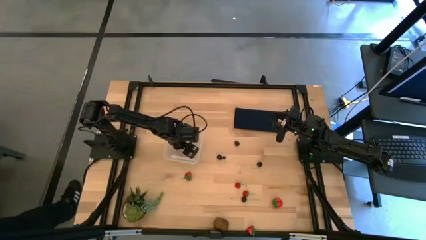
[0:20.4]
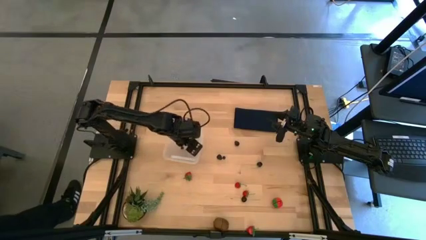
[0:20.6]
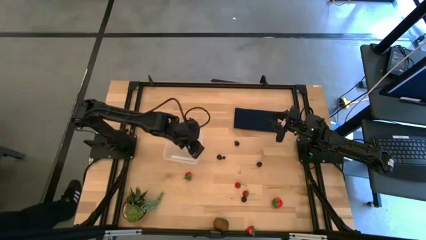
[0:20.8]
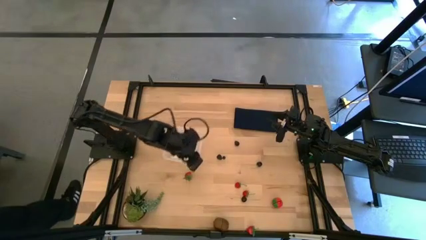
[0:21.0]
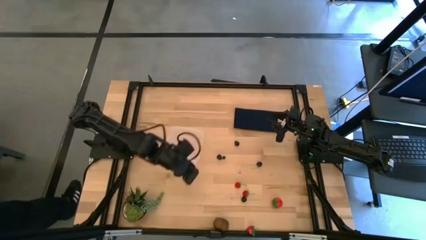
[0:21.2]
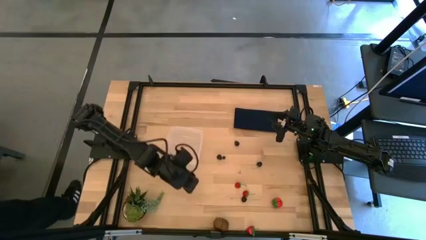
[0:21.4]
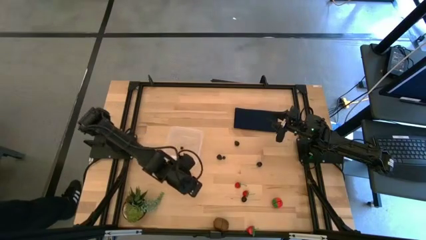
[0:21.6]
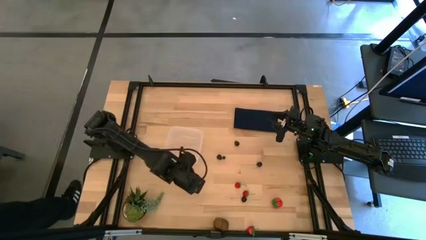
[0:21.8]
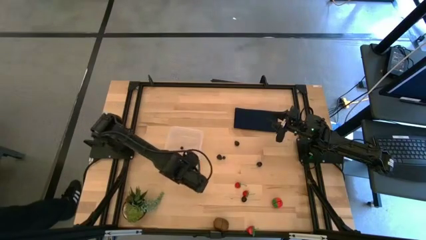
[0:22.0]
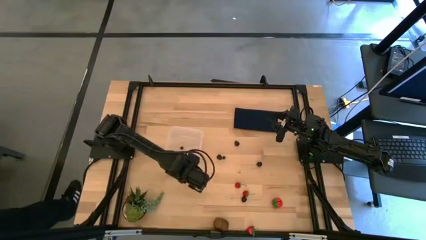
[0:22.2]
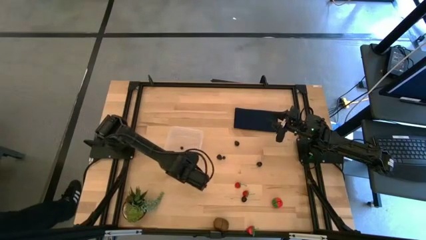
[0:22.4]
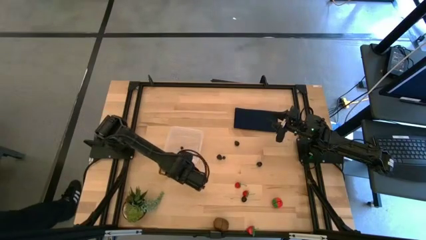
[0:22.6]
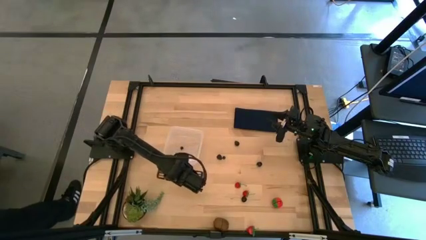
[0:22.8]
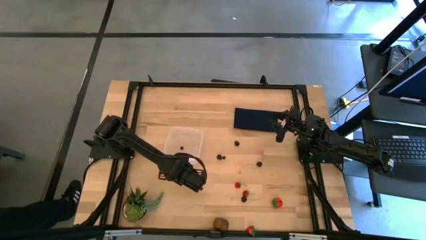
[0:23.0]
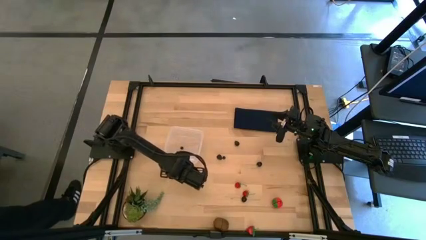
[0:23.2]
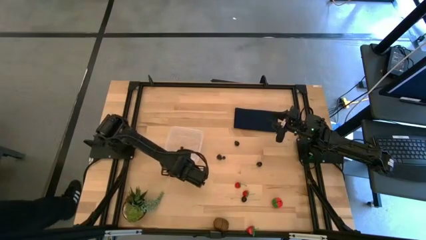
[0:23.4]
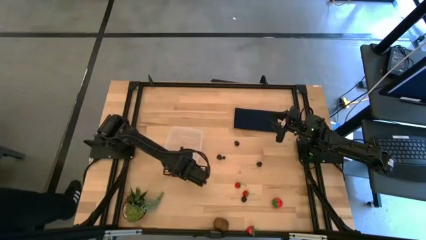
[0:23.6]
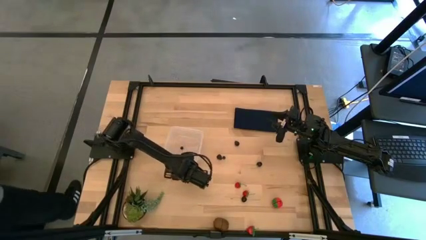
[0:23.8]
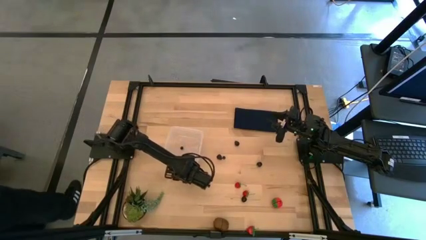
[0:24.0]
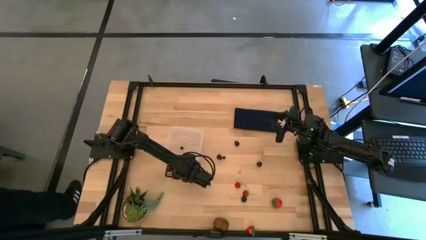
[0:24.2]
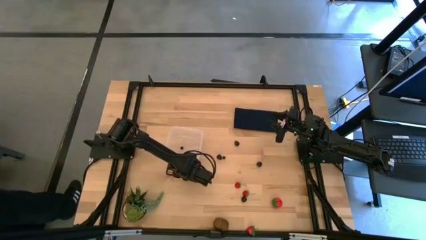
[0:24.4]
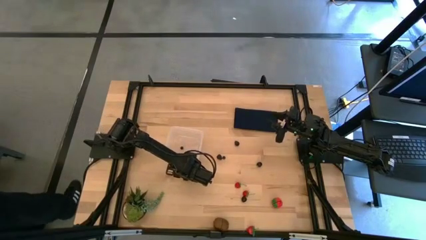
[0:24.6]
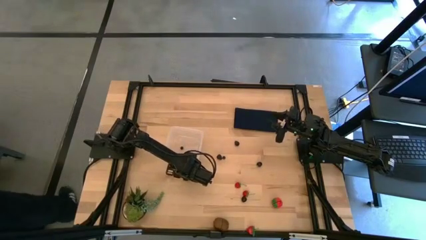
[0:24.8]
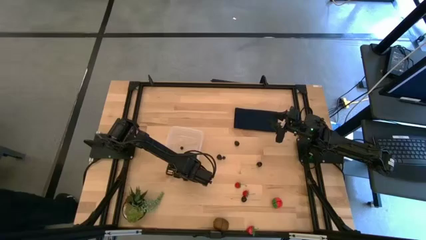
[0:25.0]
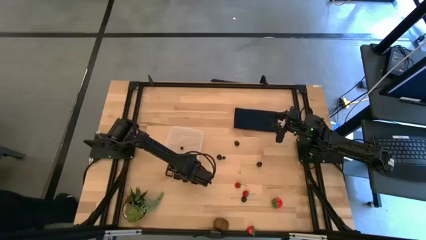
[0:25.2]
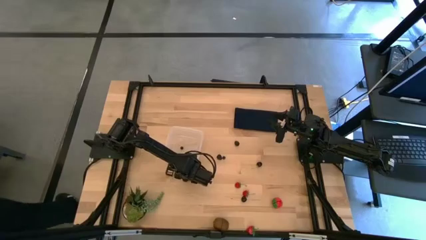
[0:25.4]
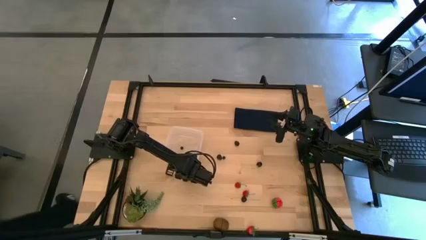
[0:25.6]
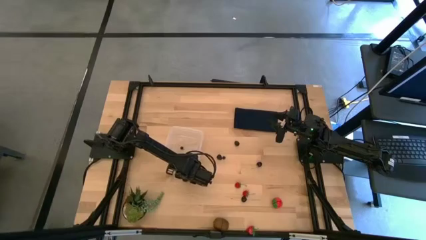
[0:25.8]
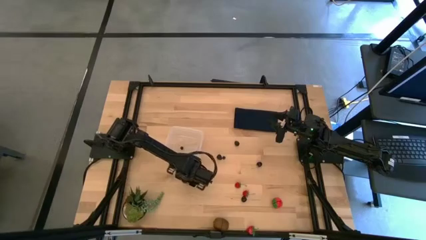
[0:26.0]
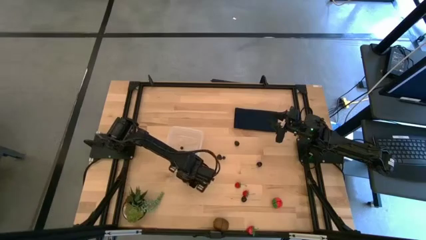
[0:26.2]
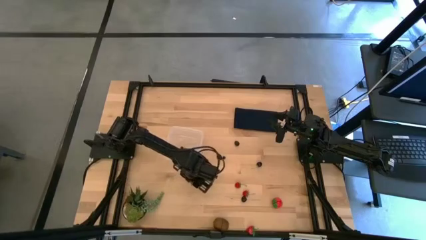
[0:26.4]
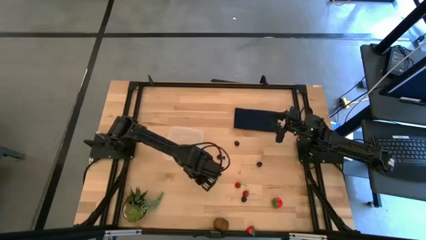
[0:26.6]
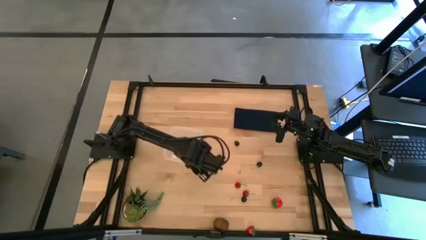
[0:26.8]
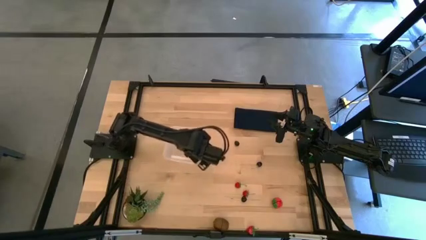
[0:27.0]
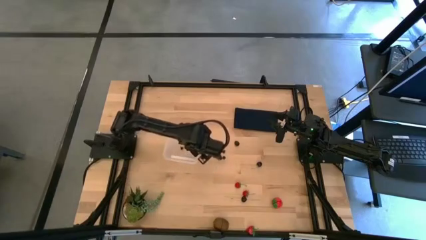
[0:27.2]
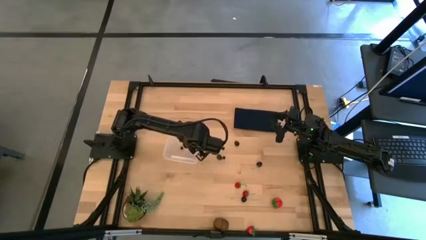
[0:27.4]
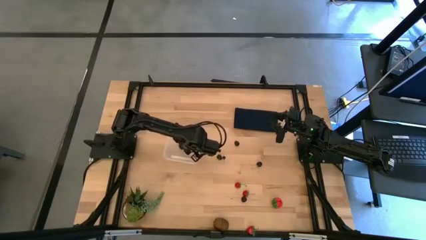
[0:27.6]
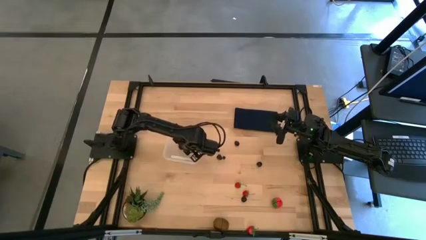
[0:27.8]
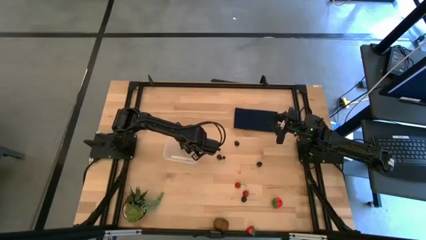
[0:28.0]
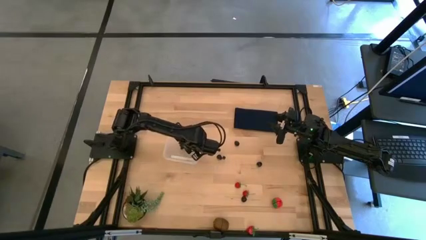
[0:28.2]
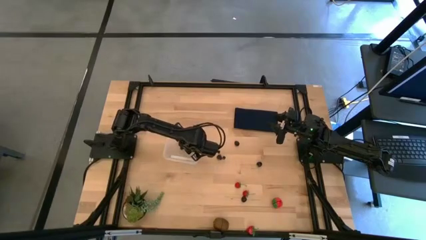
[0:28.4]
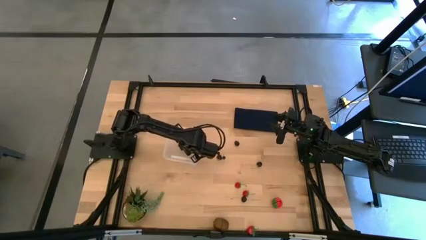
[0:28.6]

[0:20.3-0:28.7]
Task: Pick and placing Produce into tupperware
Put the left strawberry into the transparent bin

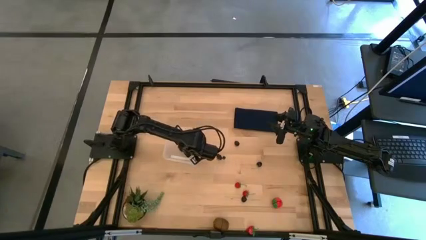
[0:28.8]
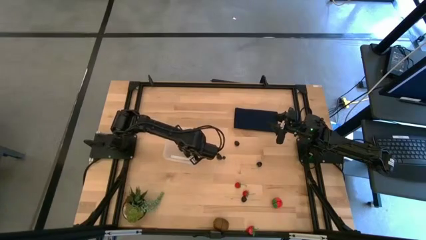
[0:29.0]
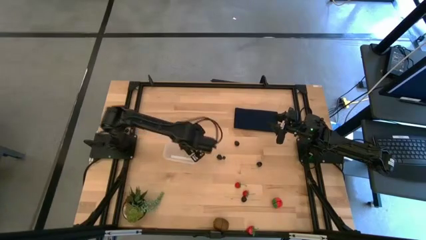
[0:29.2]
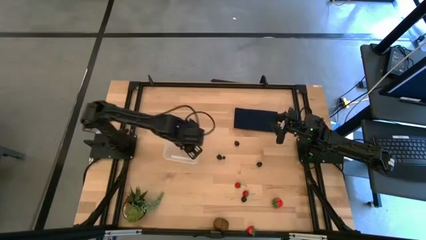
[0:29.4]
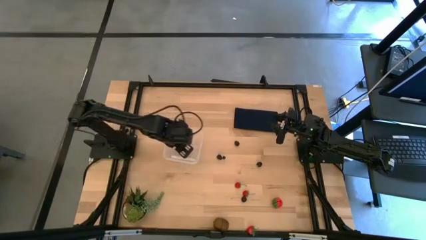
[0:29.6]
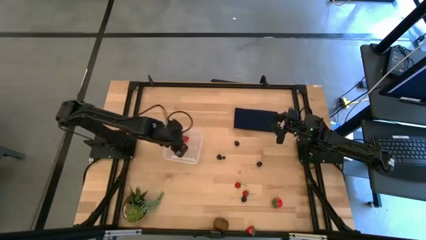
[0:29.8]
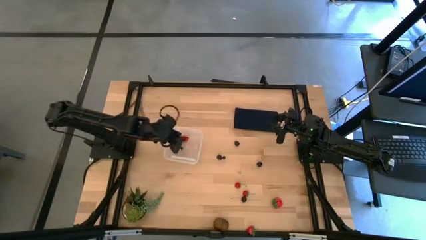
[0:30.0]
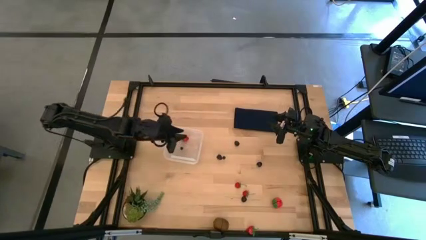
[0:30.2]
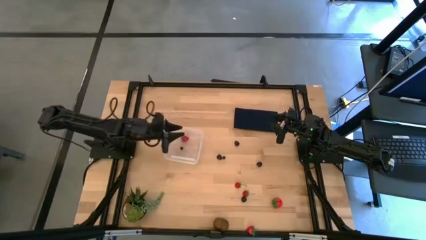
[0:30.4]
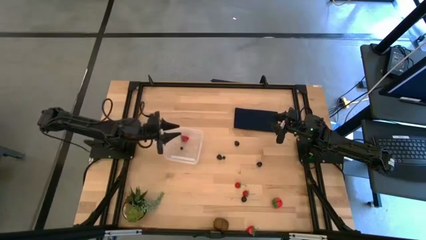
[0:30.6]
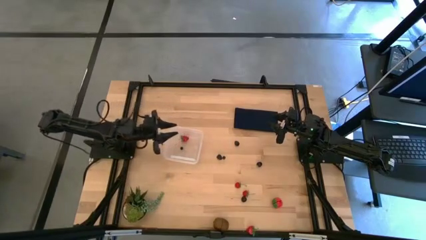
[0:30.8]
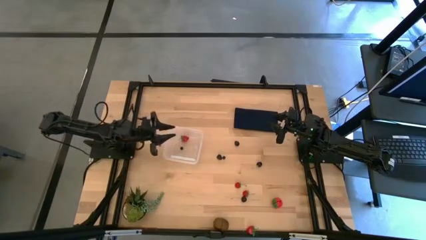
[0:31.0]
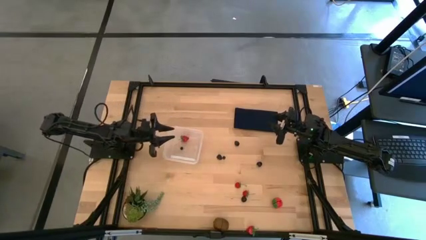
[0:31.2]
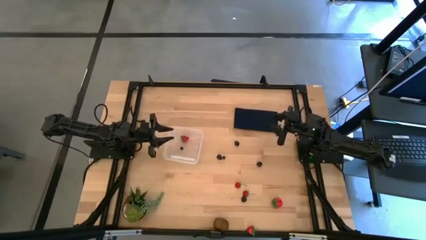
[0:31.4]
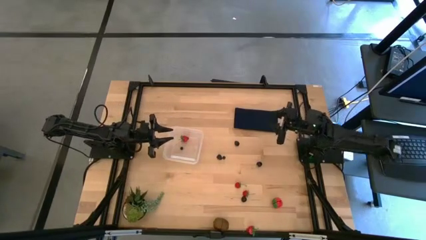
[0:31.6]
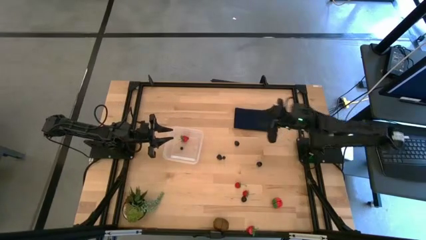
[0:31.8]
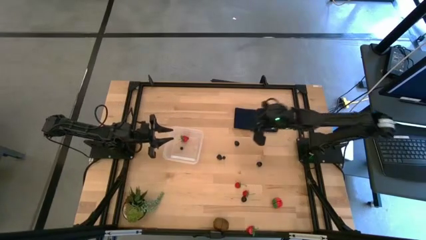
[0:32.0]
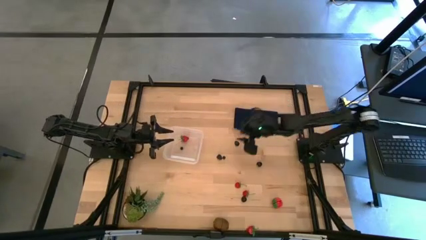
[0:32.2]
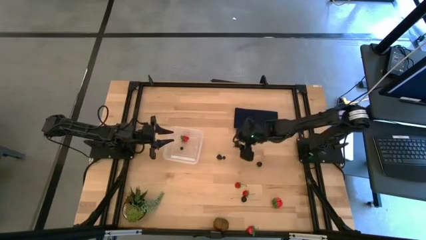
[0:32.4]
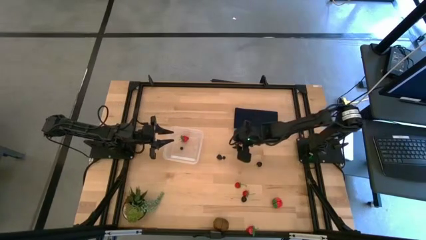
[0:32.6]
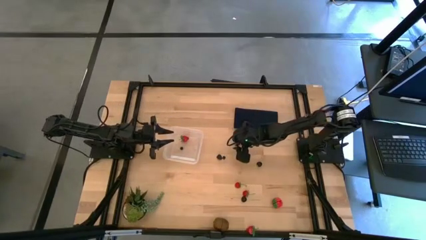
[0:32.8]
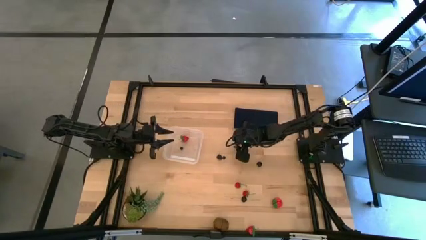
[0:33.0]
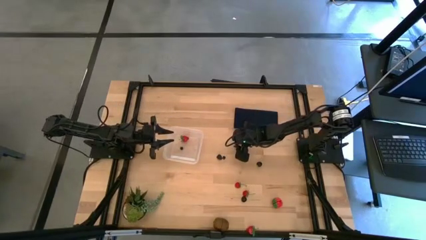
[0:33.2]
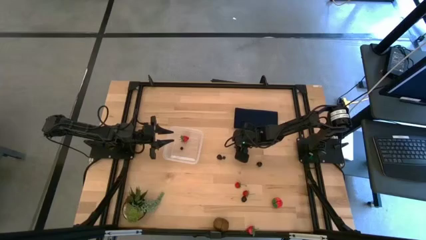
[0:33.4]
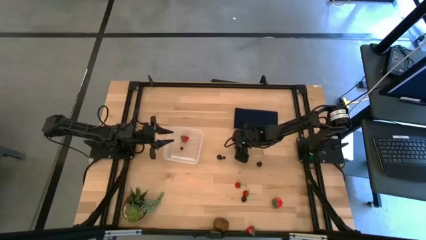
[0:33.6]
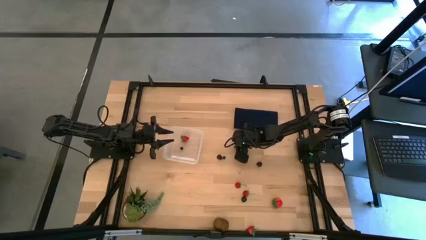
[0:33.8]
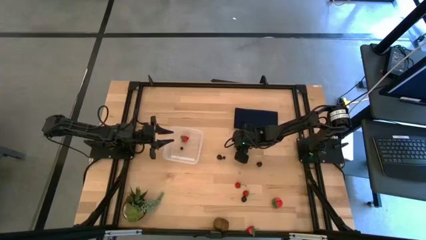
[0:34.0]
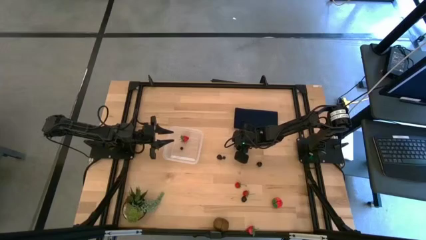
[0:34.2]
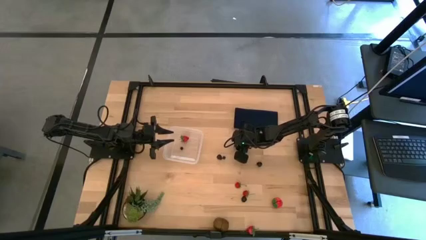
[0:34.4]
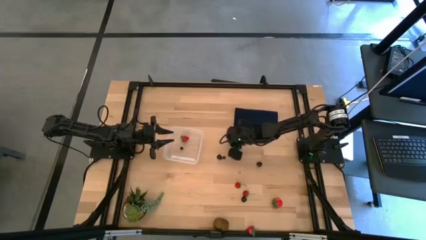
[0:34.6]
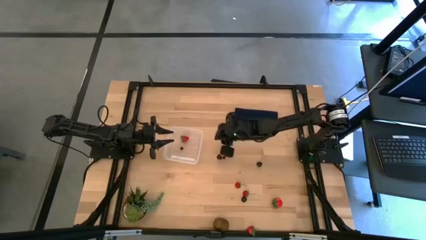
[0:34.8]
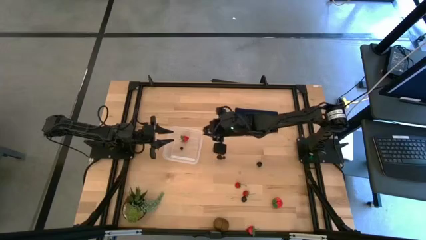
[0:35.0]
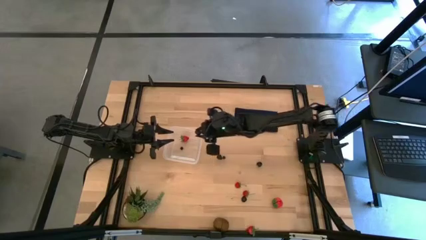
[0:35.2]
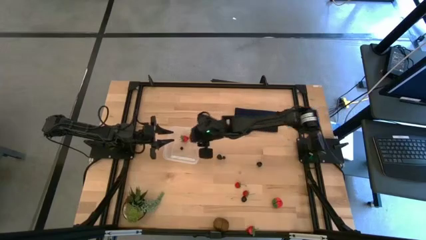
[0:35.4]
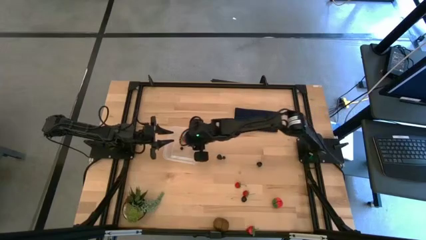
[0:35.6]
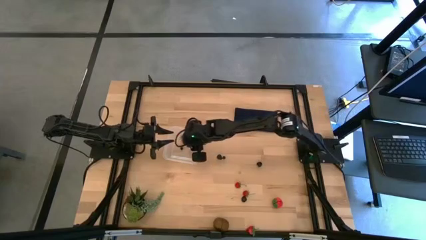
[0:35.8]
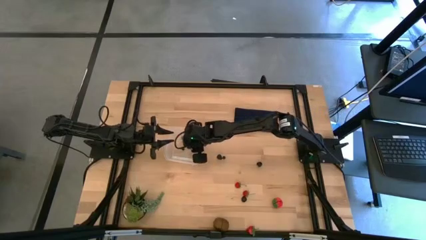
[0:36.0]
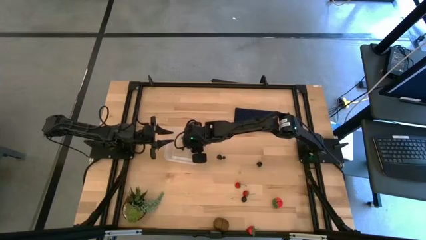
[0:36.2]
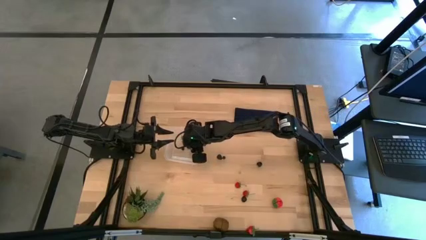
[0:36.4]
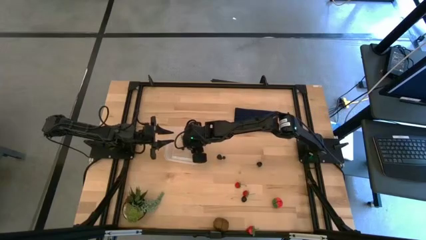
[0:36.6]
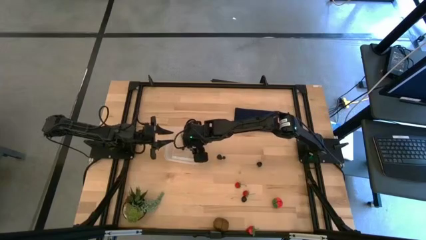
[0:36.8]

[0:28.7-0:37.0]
Put the top blackberry into the transparent bin

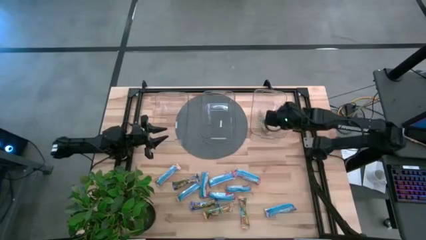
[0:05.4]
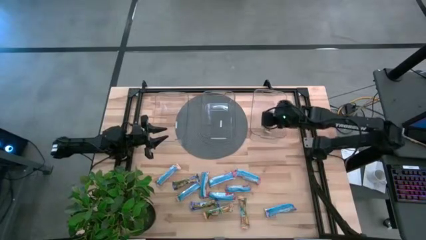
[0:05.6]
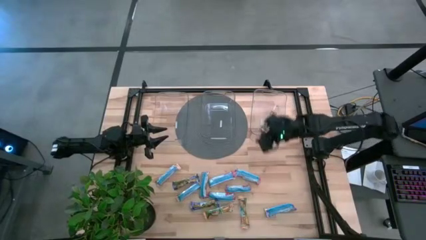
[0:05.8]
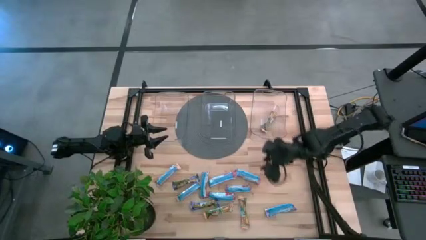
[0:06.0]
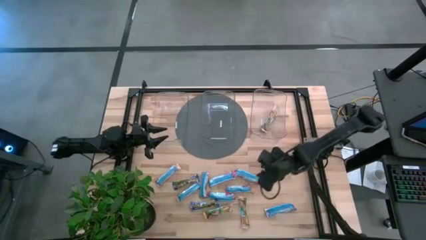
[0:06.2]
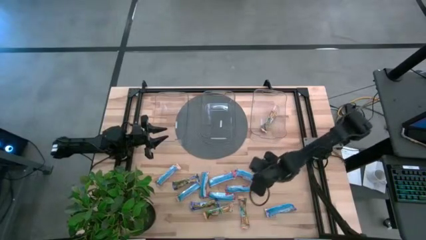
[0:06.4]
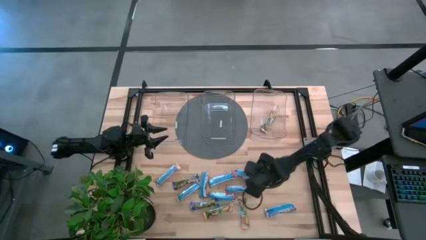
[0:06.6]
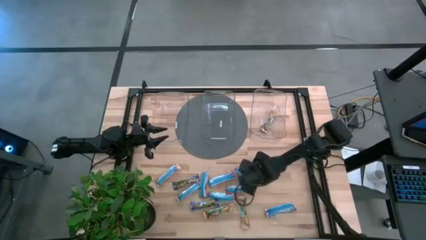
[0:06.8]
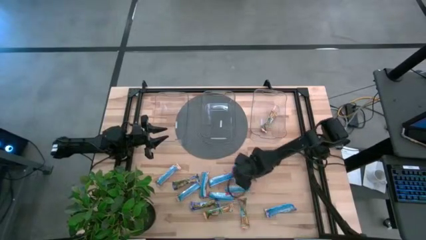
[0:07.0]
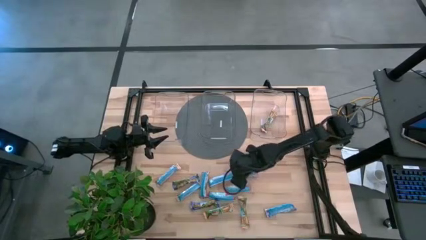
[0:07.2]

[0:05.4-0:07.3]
Task: Pick and place Granola Bars by type
Put the red granola bar into the middle transparent bin
